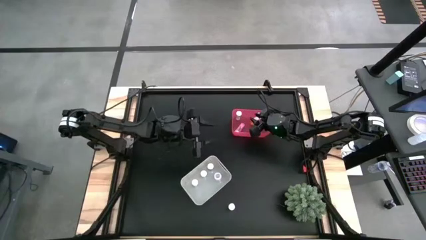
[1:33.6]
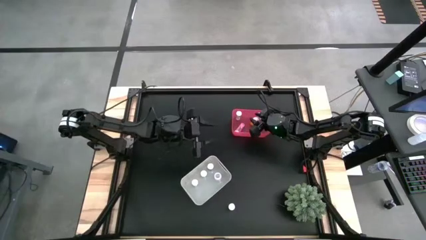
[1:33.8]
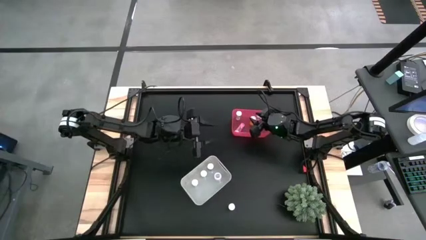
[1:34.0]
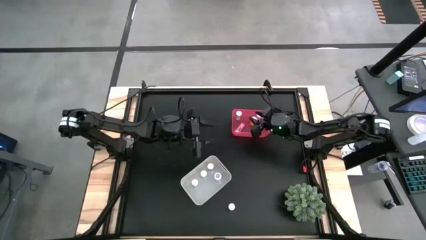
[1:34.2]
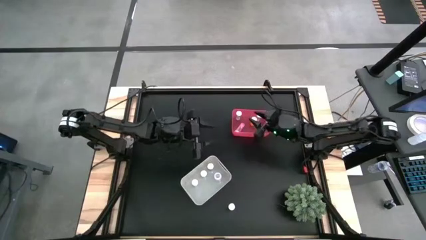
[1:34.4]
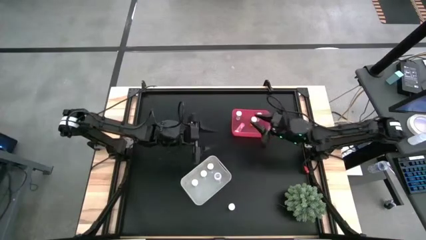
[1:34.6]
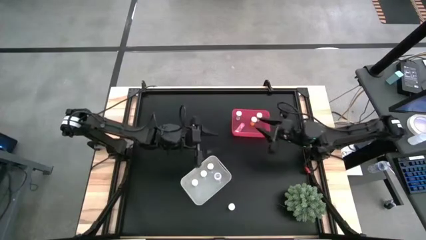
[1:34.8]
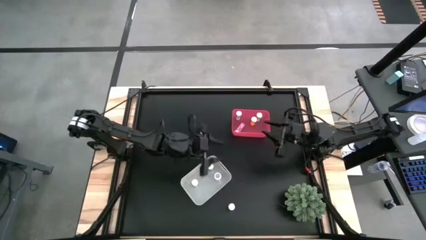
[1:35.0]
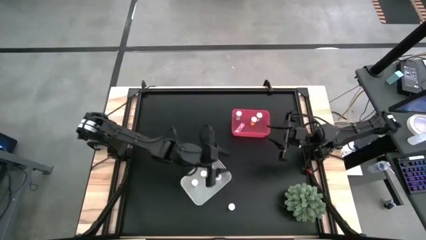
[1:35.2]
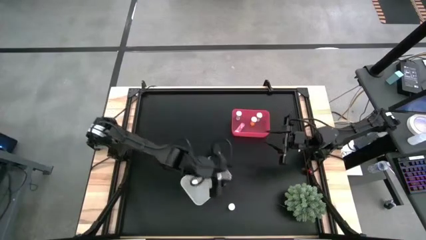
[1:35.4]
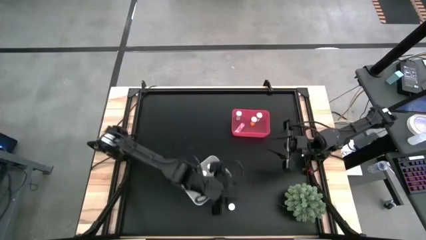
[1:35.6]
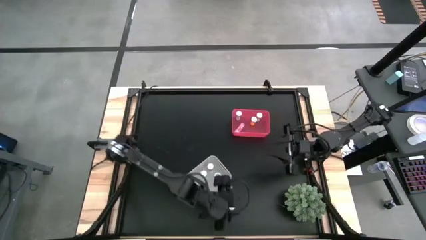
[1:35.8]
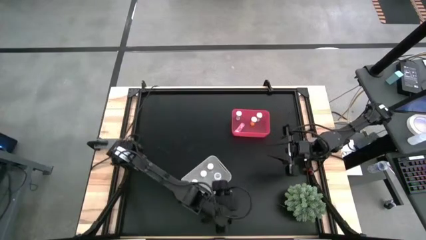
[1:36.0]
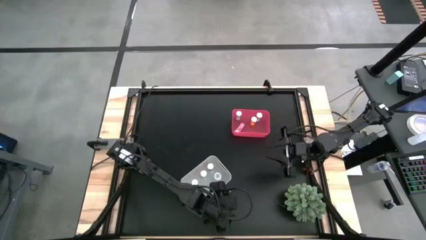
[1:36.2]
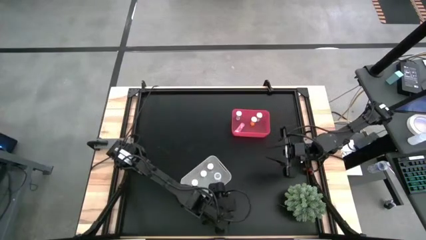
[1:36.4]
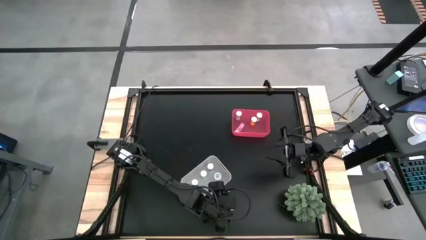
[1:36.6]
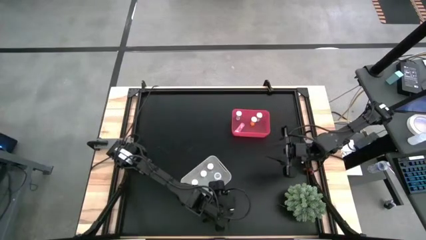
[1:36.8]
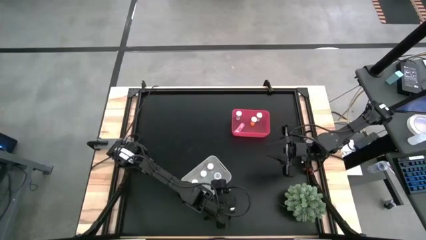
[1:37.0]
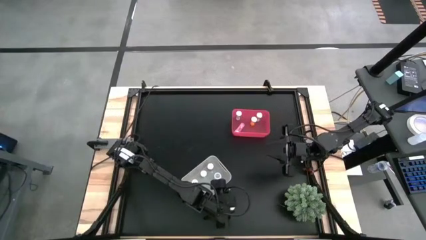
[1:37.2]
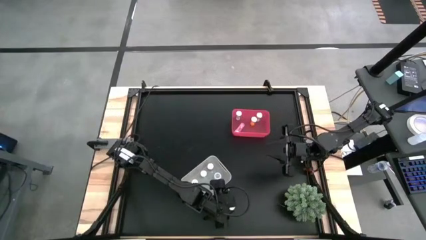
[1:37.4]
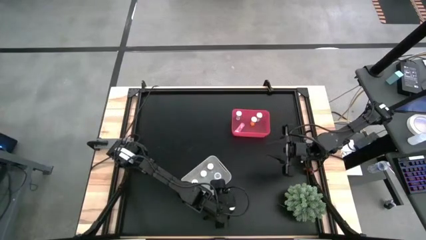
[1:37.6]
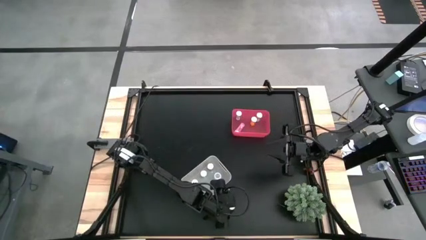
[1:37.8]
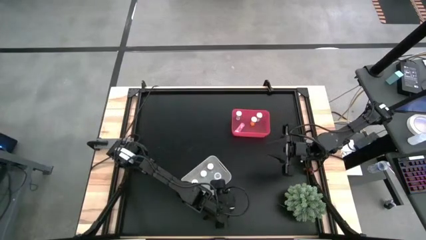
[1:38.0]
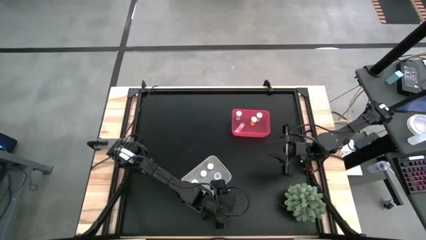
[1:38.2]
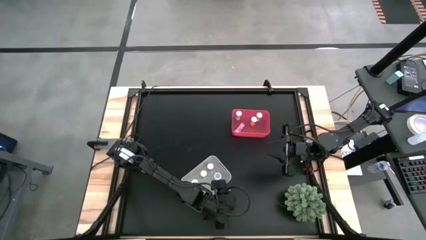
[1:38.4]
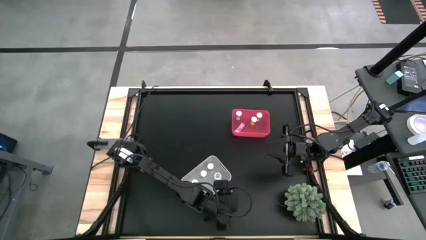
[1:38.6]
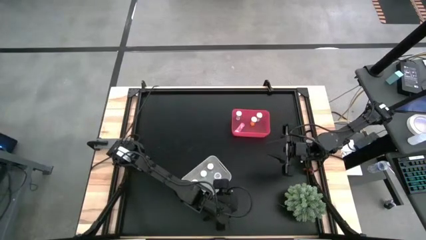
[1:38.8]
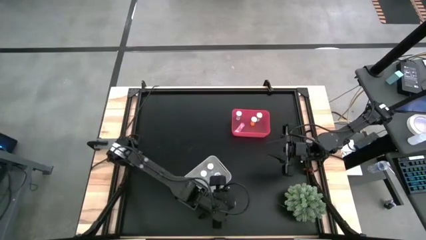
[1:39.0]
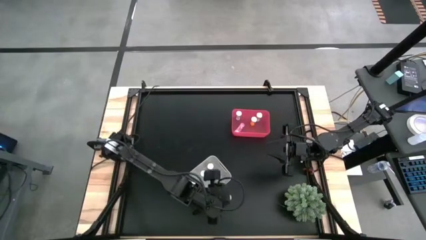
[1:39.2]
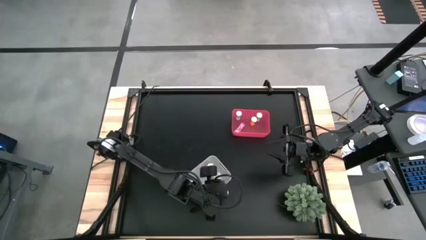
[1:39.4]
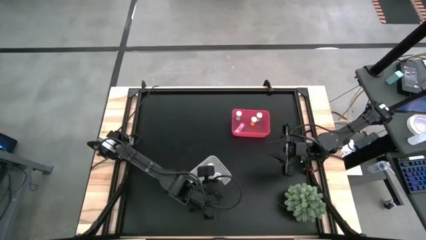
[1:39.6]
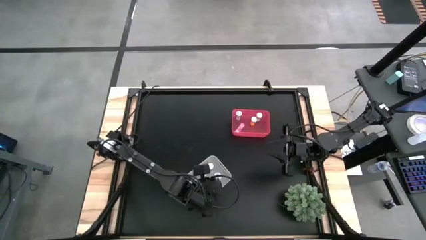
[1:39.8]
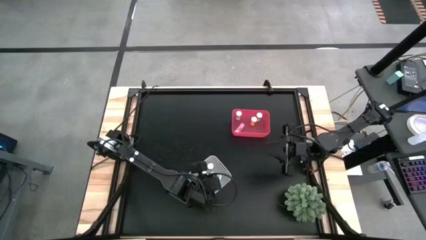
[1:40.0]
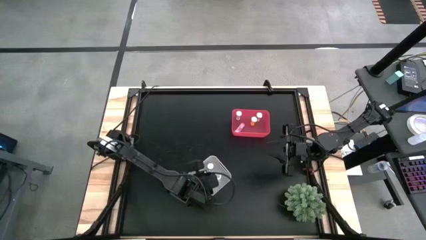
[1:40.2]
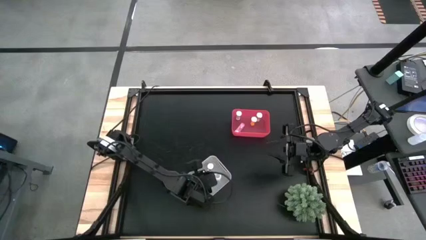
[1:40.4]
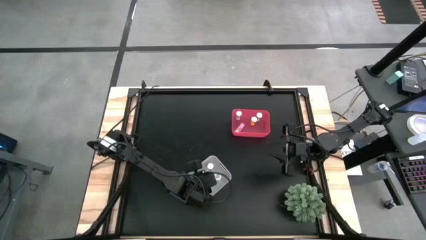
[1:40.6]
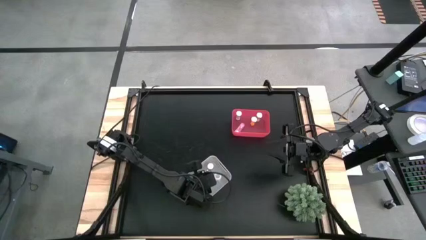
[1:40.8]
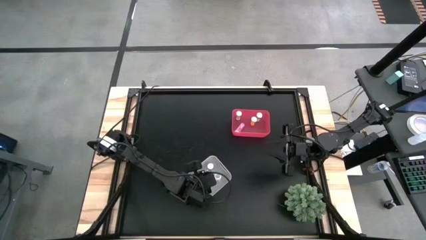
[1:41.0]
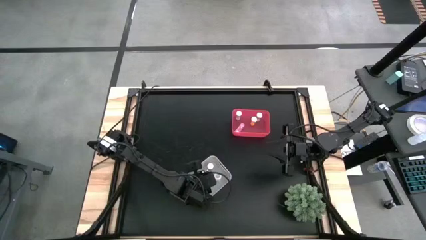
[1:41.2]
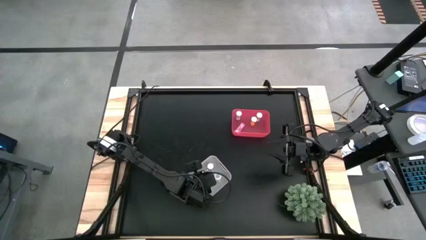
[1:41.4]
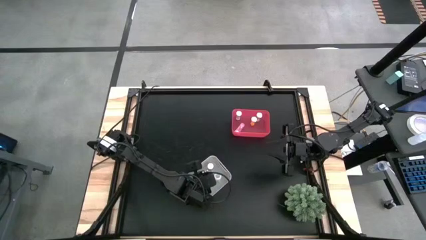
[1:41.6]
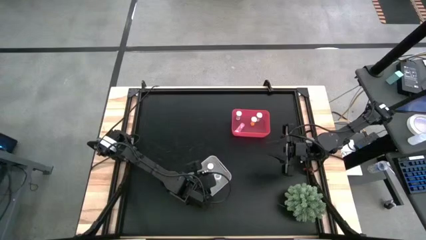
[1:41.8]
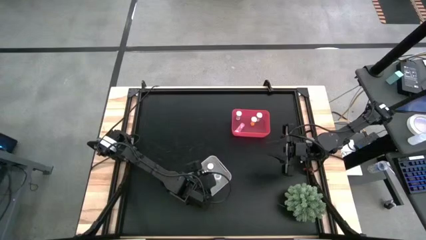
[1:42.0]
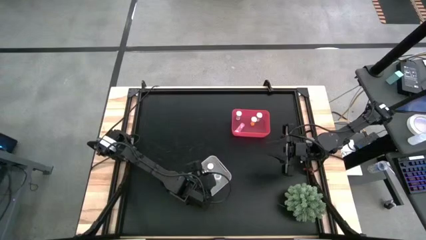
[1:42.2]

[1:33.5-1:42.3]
Task: Pick and place medicine bottles into bin by pill shape (circle, oval)
Put the blue capsule bottle into the white bin

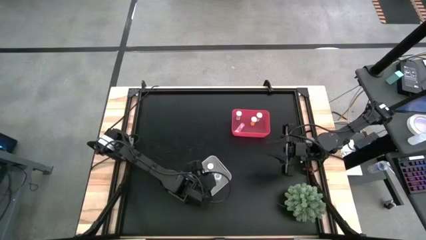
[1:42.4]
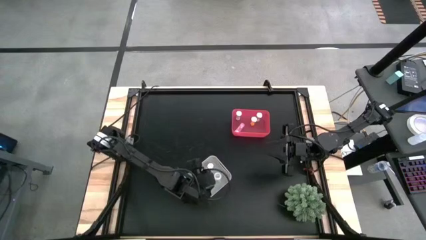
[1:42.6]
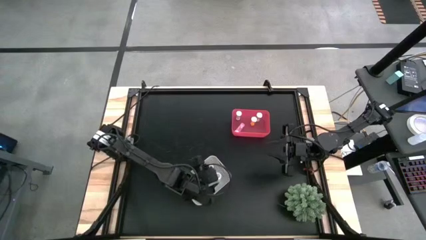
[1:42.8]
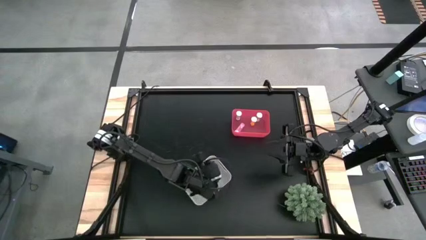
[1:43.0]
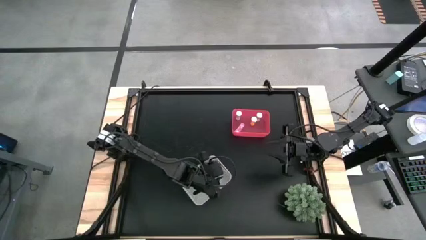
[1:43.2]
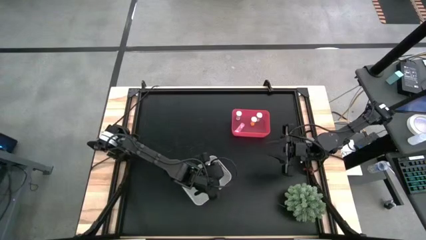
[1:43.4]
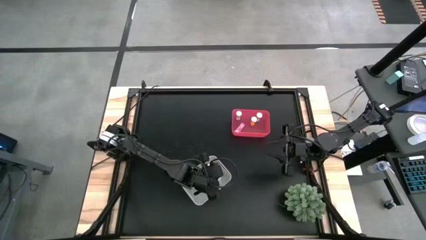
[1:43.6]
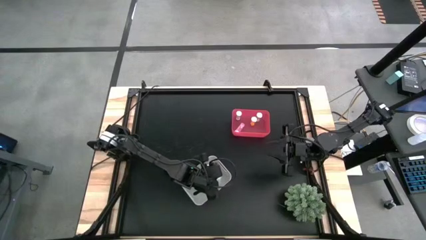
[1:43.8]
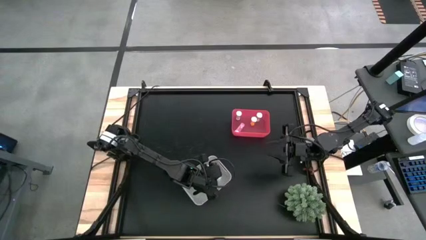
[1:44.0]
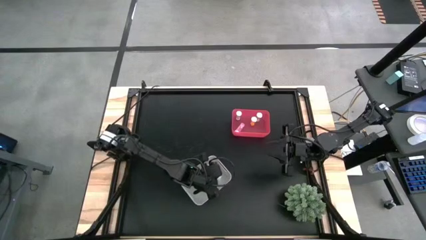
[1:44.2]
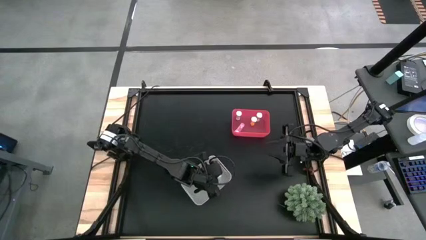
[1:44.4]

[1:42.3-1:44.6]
Adjust the transparent capsule bottle in the white bin

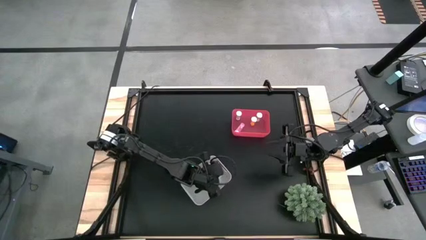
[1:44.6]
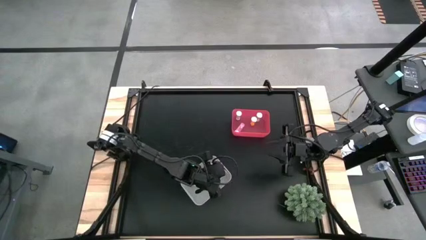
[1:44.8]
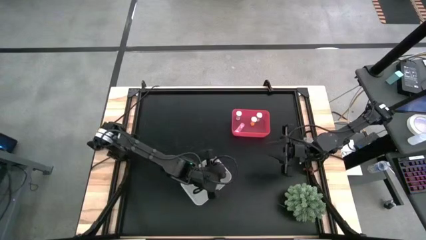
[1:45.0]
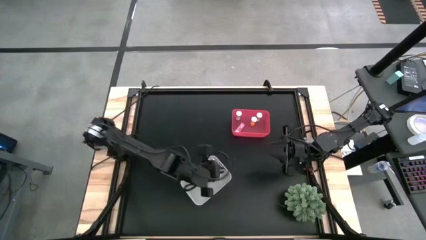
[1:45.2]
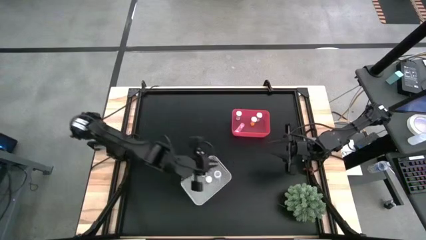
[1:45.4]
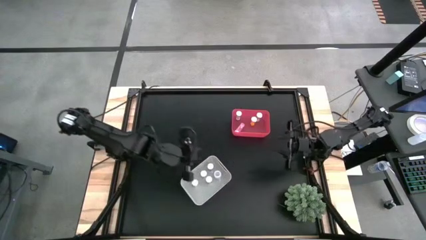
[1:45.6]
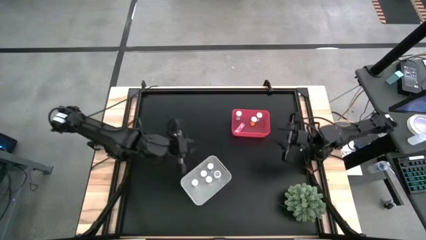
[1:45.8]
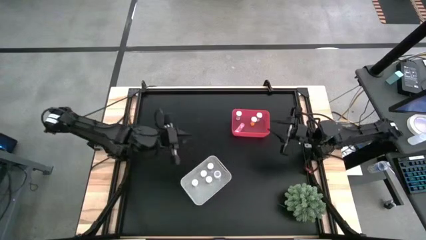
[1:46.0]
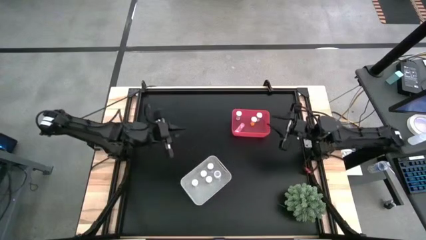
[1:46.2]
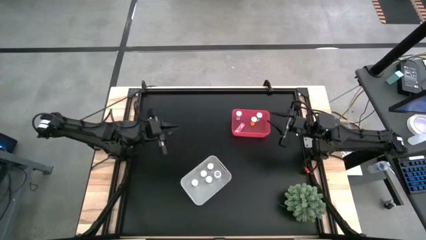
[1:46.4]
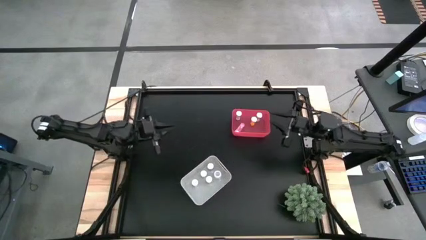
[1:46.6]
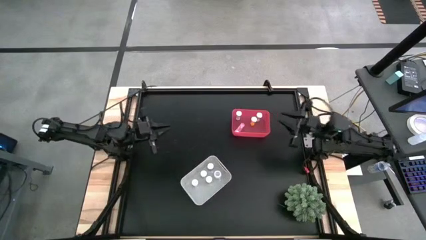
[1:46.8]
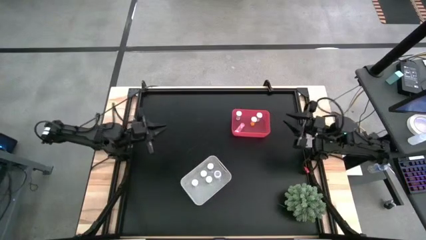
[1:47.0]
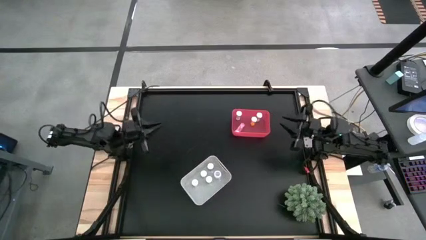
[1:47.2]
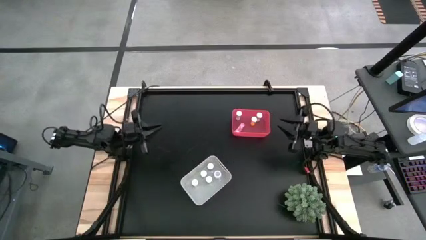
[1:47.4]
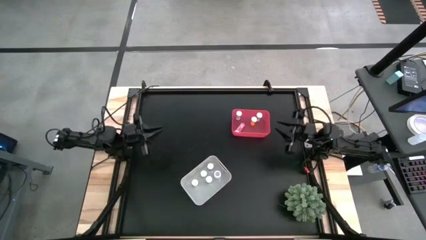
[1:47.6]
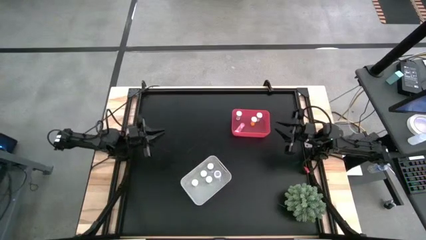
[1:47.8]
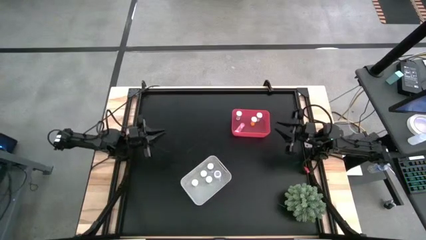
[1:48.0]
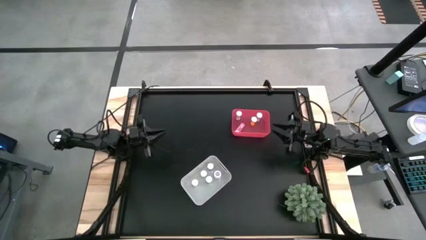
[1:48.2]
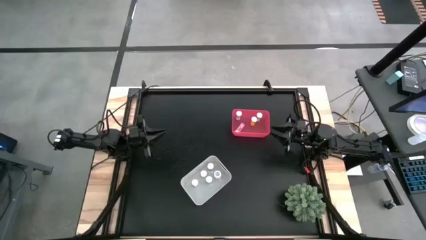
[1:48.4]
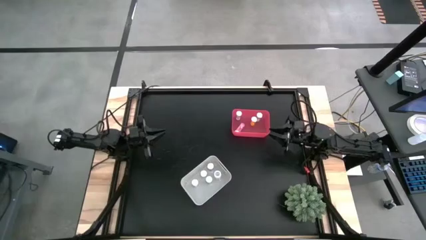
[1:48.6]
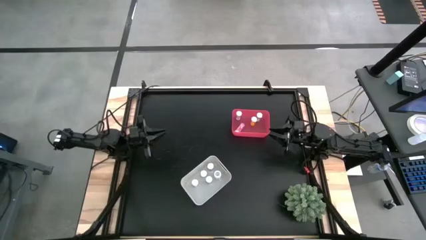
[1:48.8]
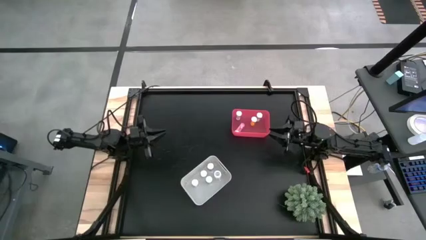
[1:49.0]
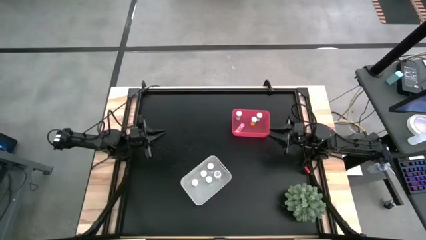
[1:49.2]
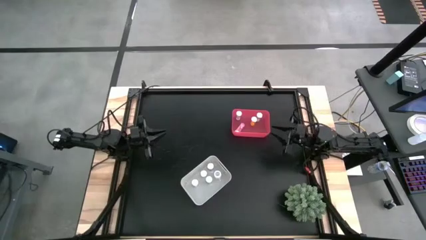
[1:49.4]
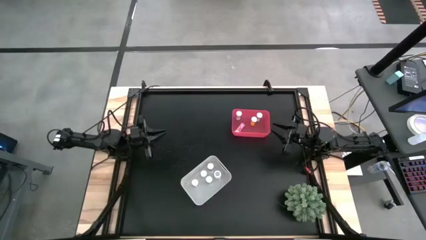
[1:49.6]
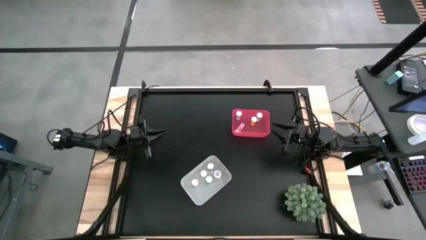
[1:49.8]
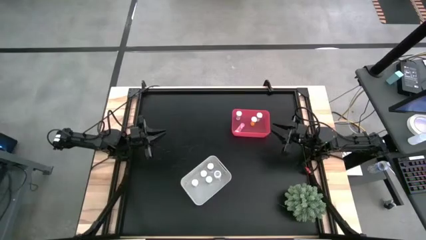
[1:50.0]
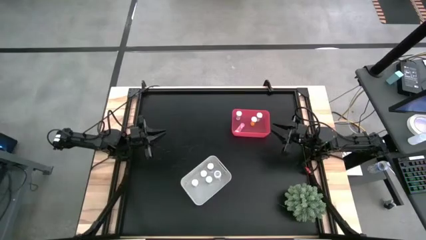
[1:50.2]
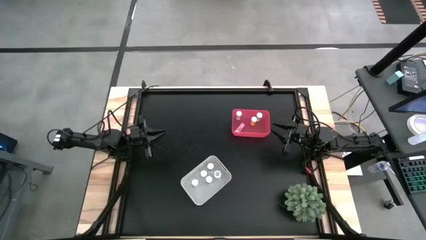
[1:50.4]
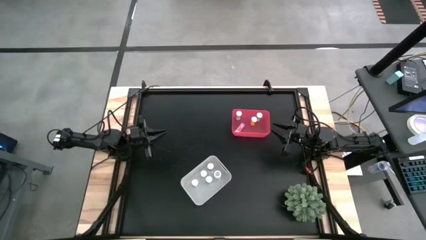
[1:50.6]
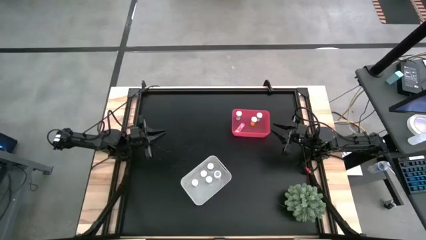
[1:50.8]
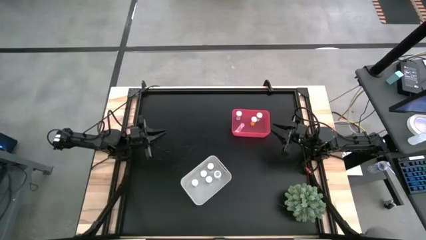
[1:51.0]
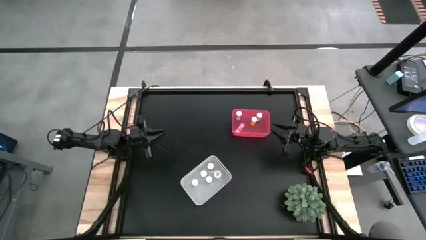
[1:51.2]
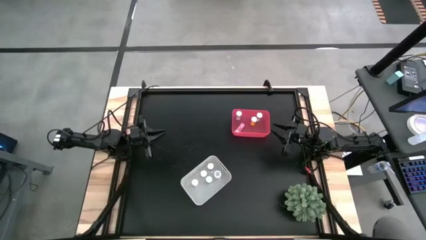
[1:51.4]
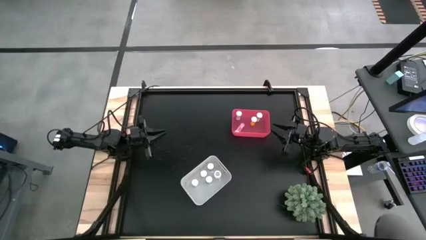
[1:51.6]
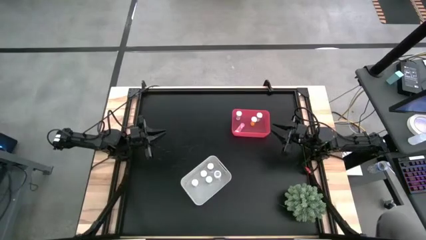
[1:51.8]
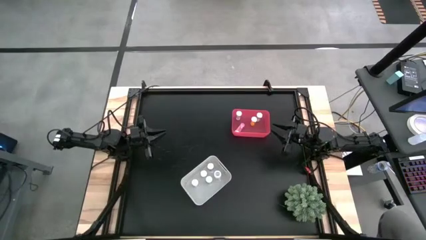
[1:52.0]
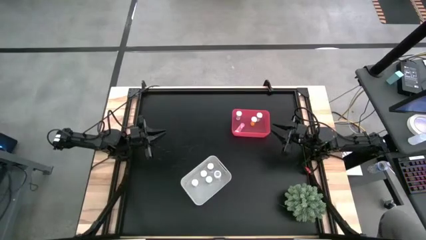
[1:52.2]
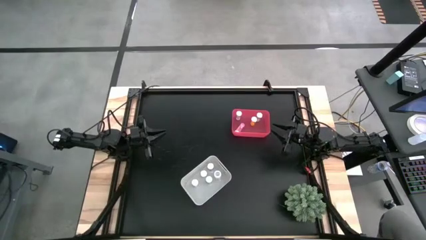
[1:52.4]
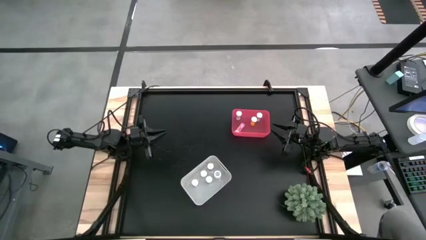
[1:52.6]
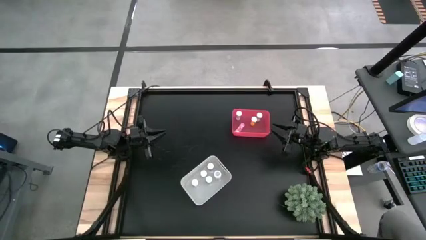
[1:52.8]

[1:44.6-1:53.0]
Return to Home Position
